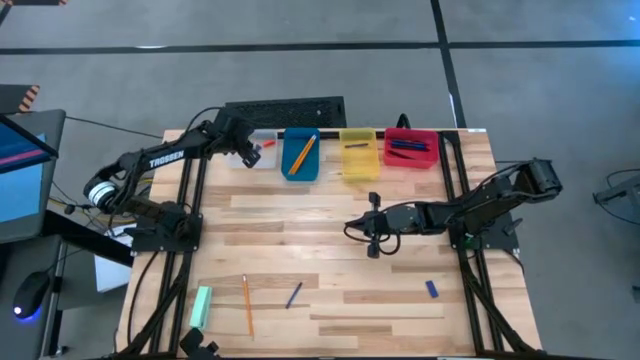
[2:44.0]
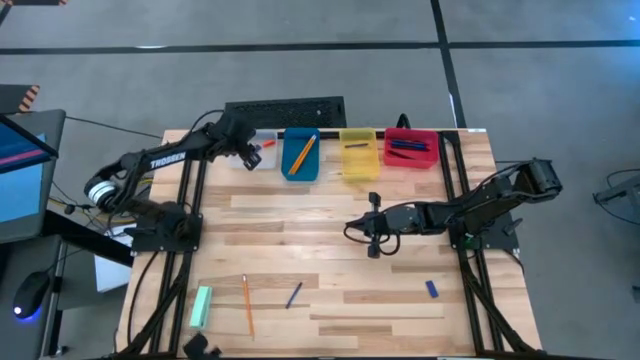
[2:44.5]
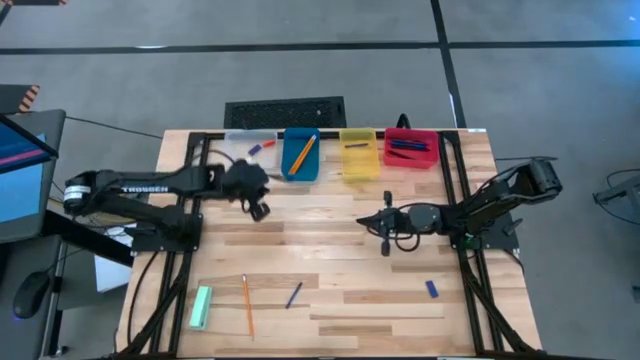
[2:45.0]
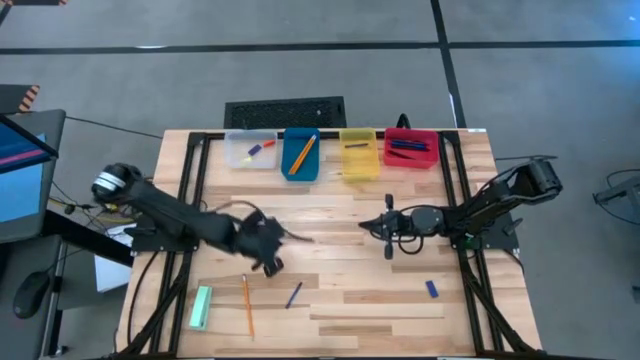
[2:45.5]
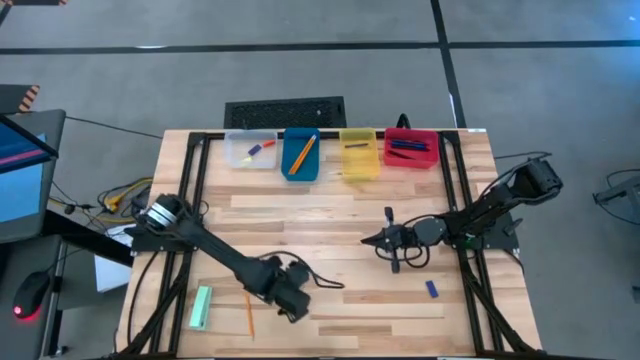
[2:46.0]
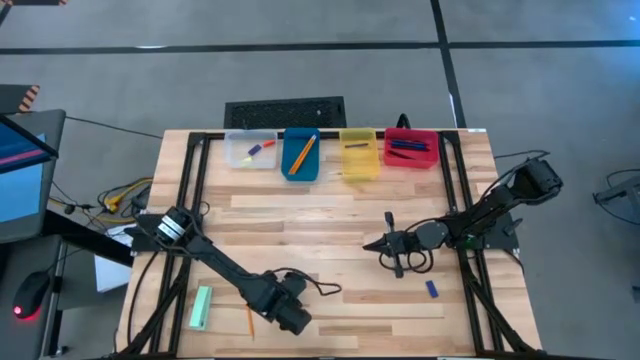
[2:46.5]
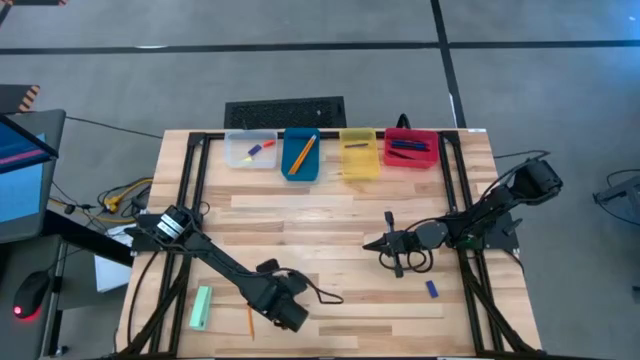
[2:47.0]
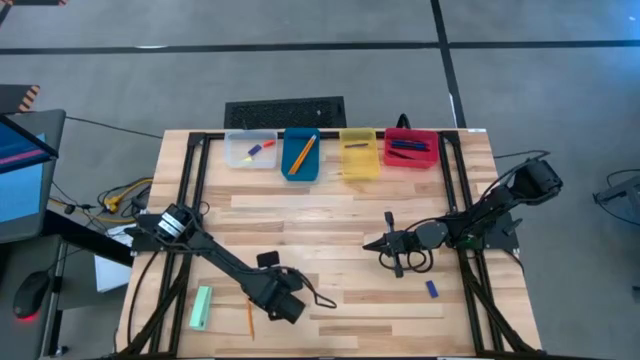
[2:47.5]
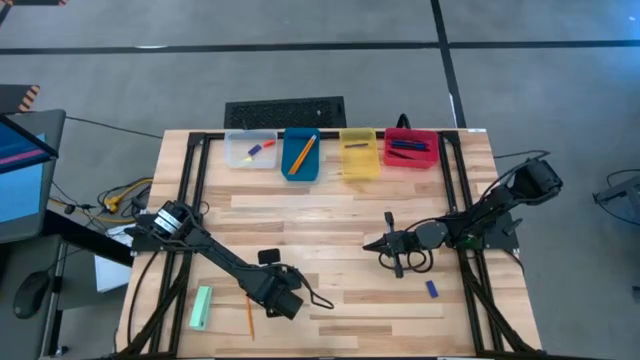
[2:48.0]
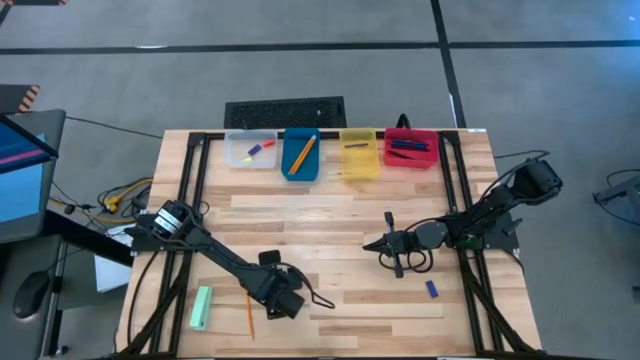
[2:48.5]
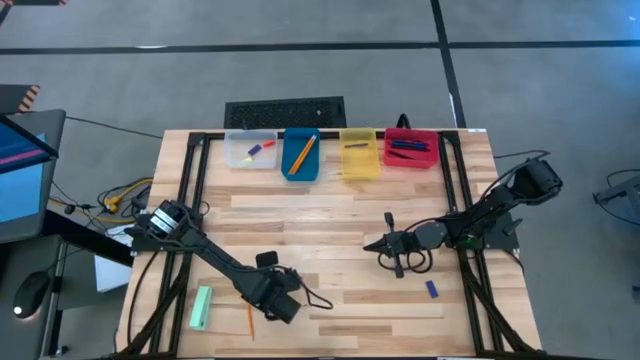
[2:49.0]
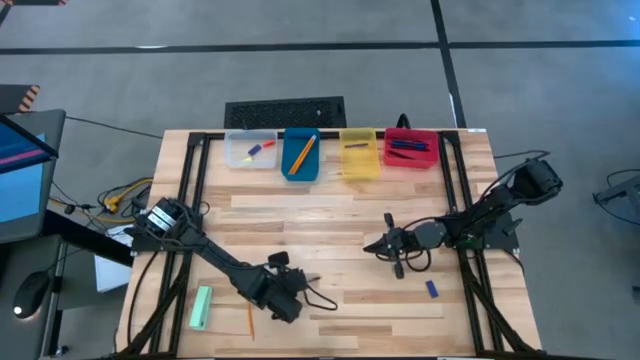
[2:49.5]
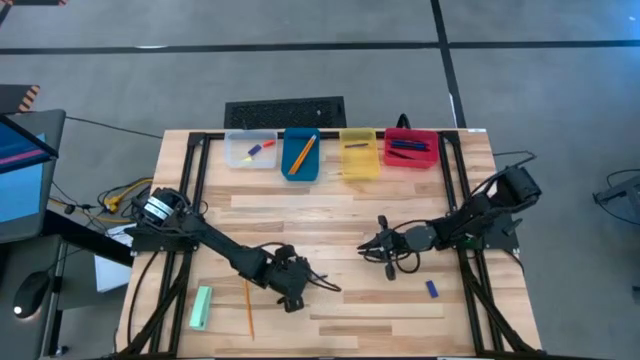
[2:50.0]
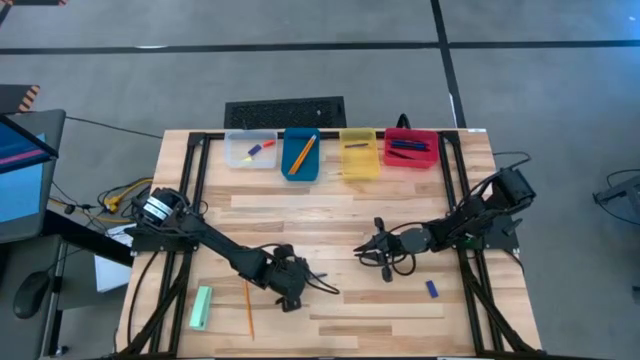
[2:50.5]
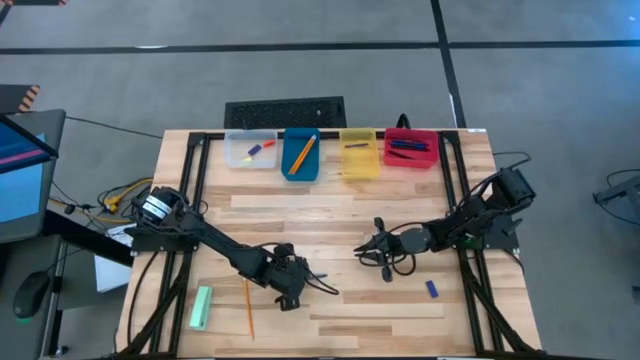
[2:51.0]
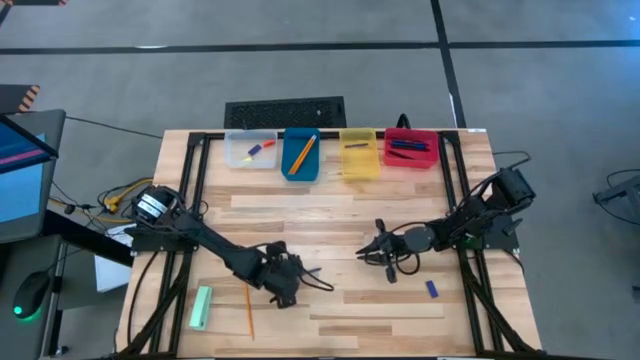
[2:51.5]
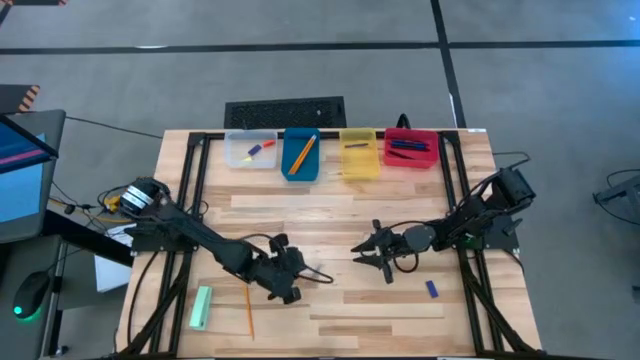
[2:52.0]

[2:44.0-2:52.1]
Task: Sort crayons/erasers/pens/pencils in bins
Put the blue crayon into the yellow bin

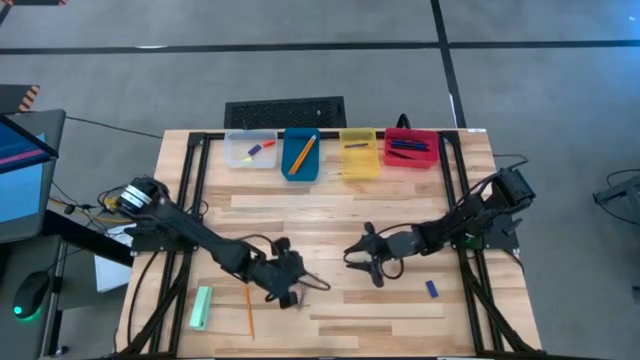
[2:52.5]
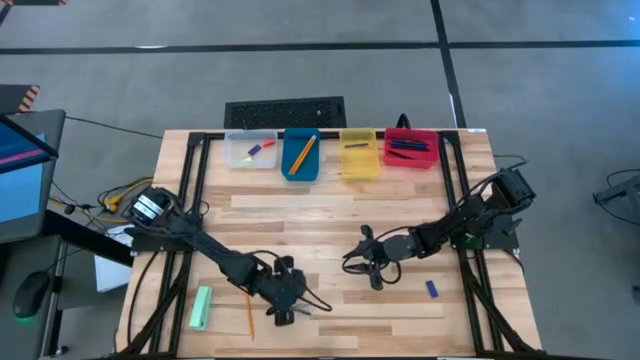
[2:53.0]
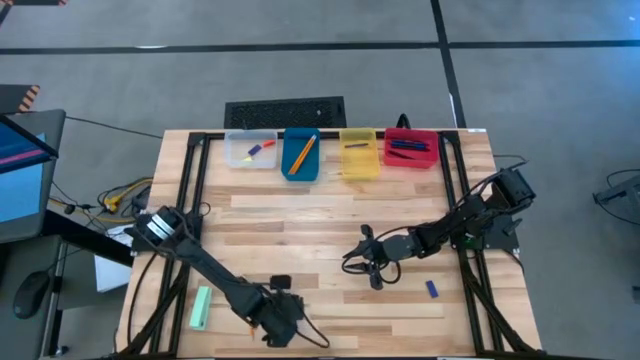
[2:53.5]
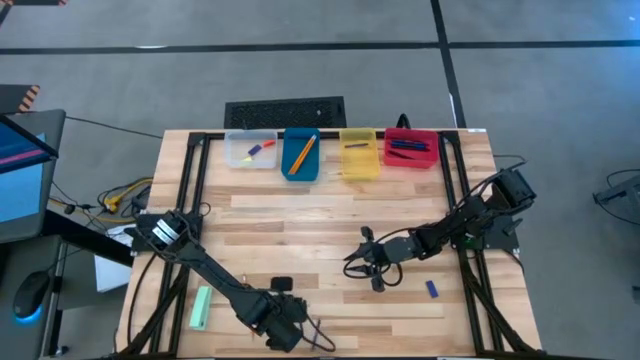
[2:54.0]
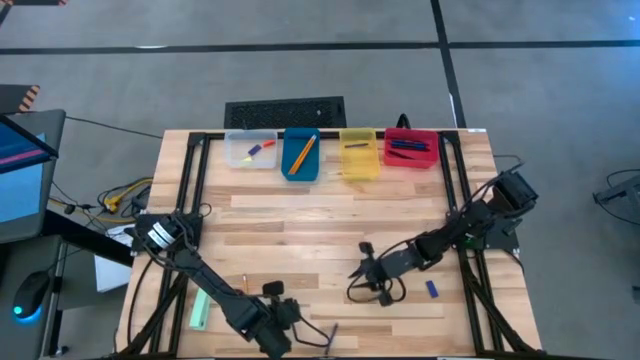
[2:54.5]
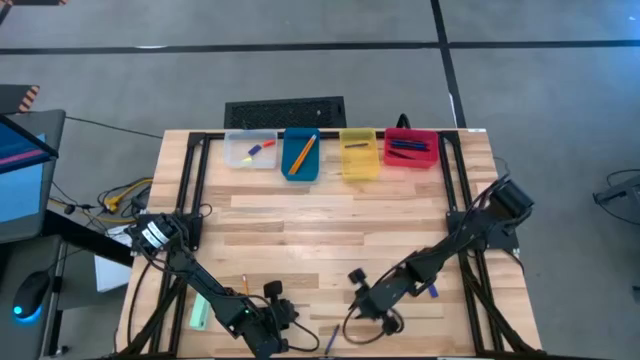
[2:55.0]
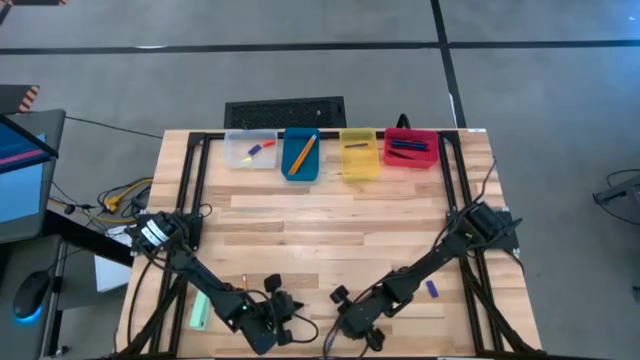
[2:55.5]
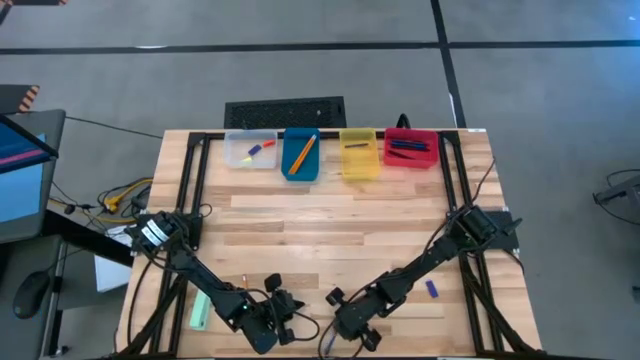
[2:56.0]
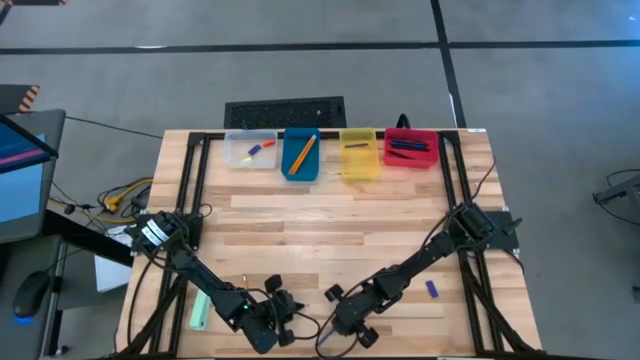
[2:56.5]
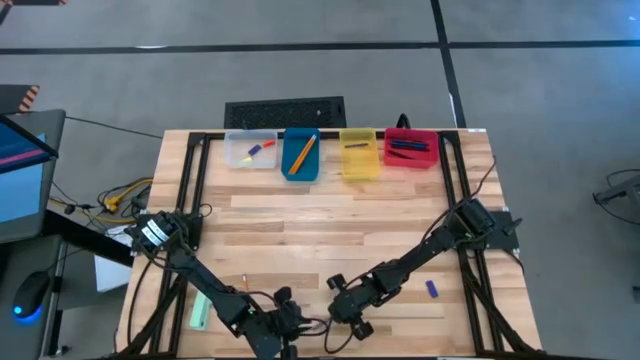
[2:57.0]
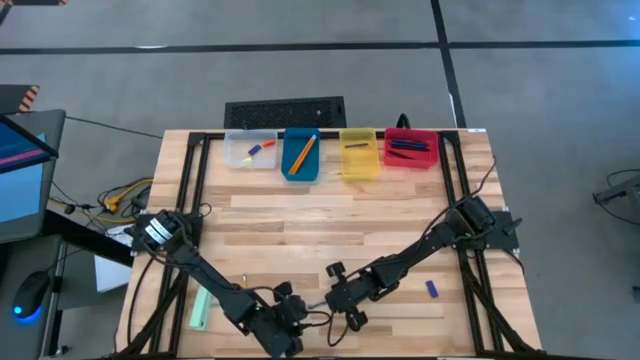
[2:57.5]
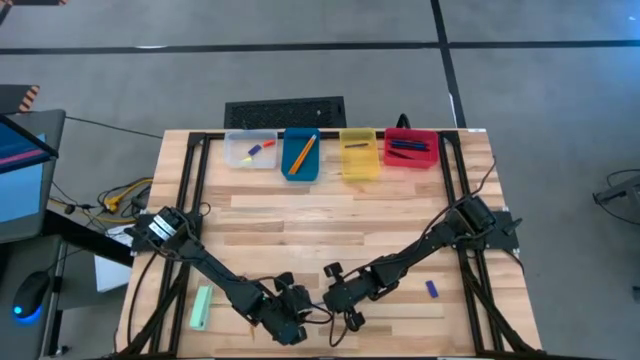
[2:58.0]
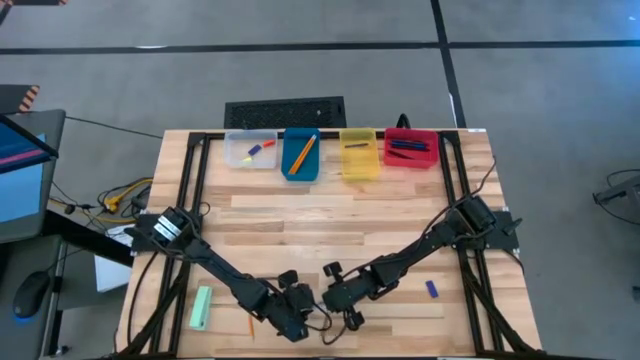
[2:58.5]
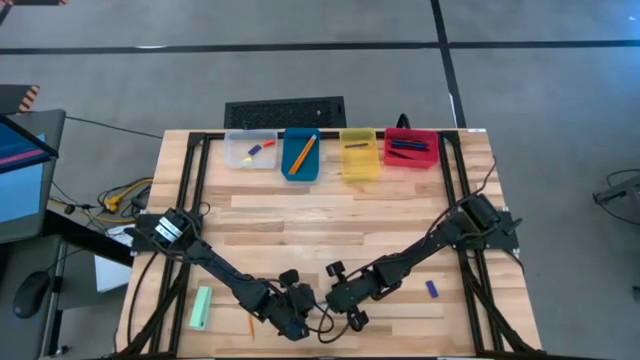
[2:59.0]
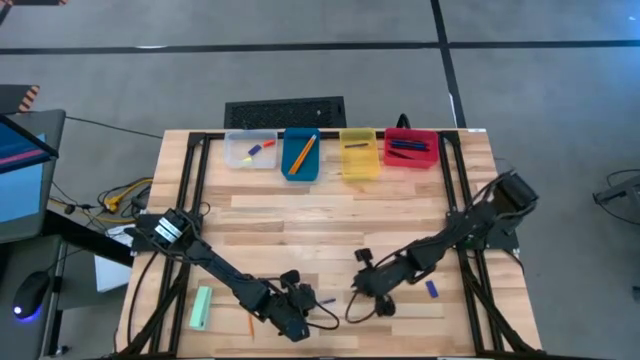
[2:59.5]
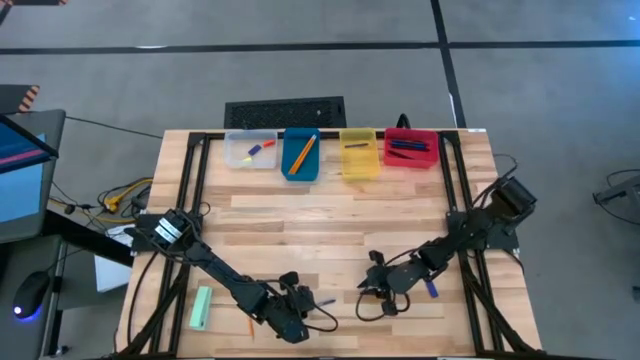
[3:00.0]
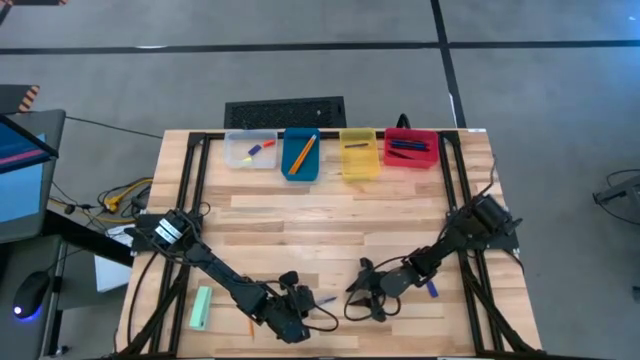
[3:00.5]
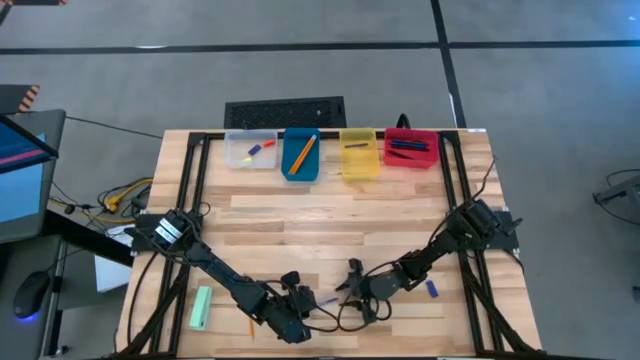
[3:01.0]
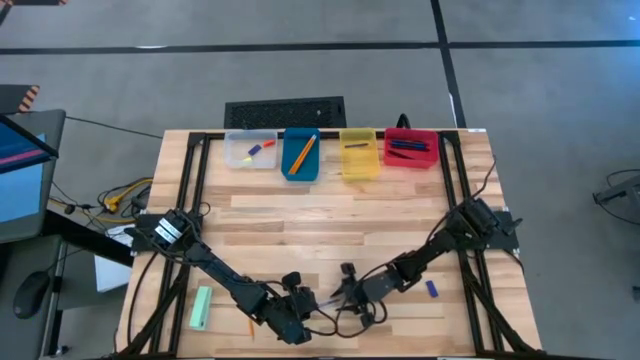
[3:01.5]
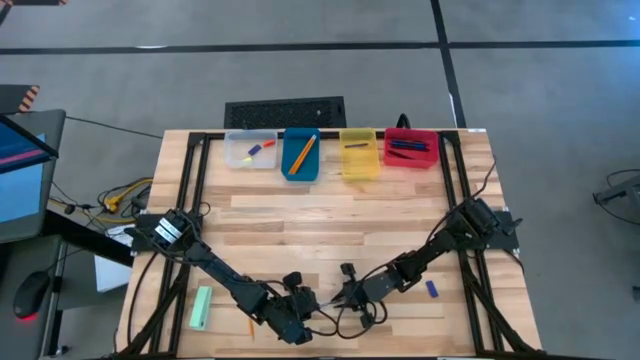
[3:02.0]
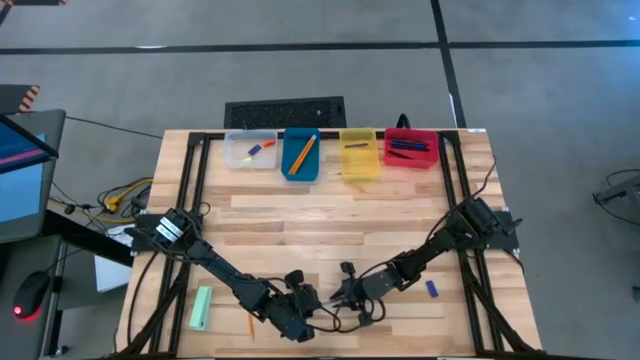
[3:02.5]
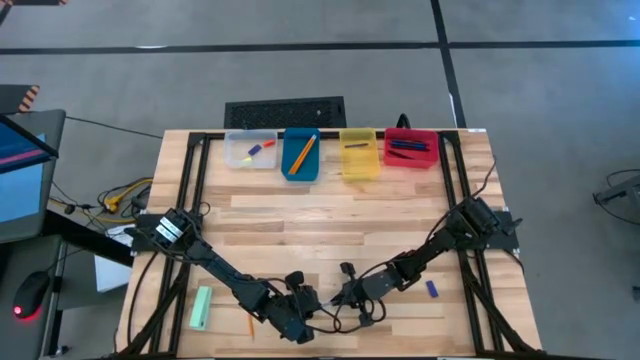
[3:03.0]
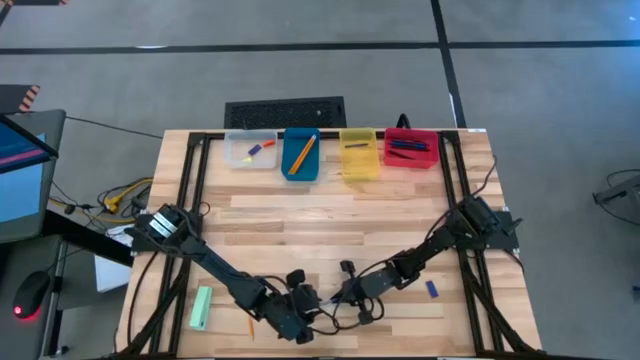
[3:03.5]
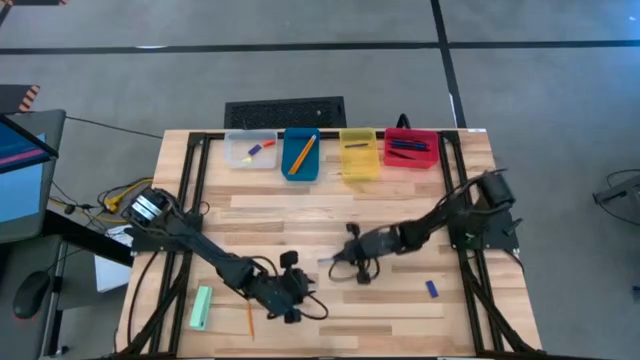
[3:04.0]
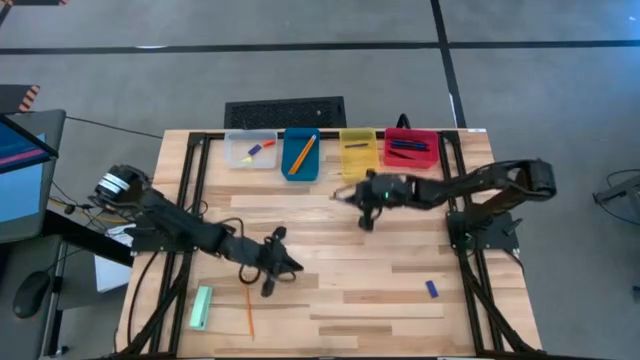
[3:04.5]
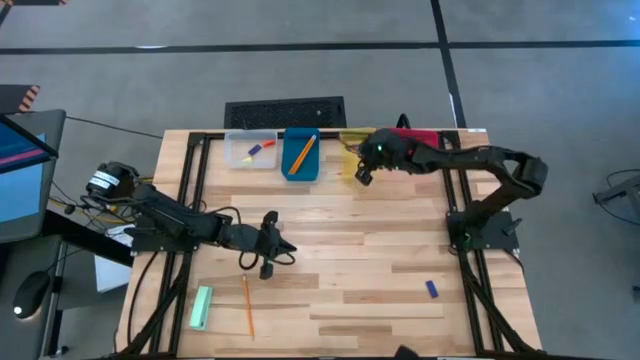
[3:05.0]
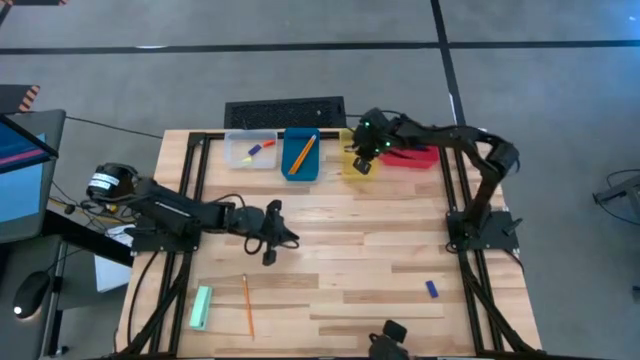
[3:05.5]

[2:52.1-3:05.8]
Put the blue crayon into the yellow bin

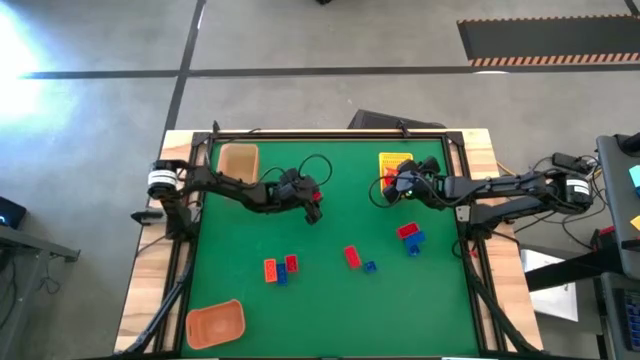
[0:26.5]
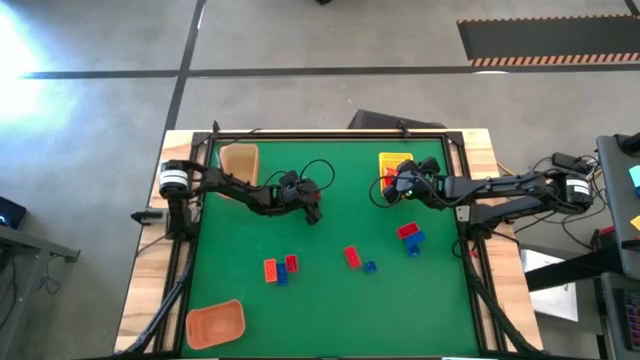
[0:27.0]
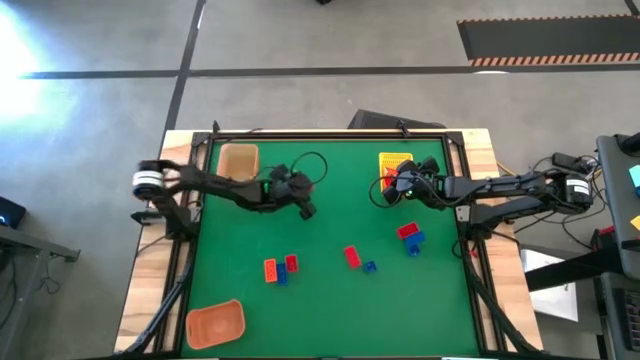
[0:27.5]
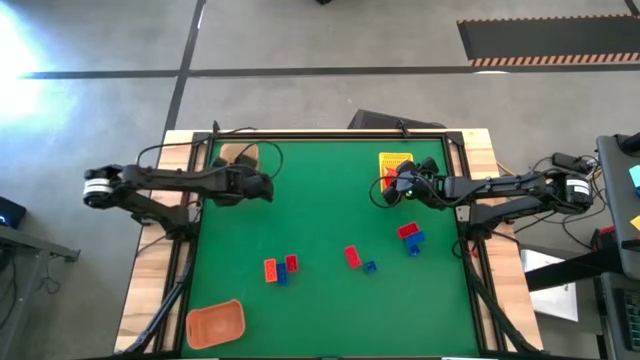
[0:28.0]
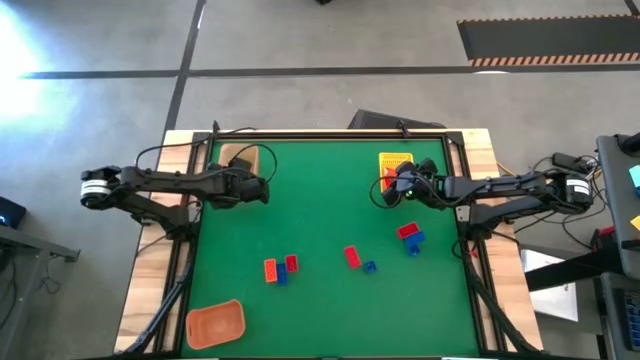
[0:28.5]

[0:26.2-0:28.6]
Task: Sort & place blocks by color
Put the red game piece into the light orange bin
